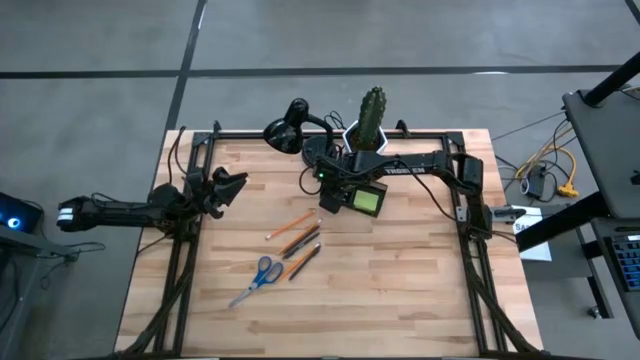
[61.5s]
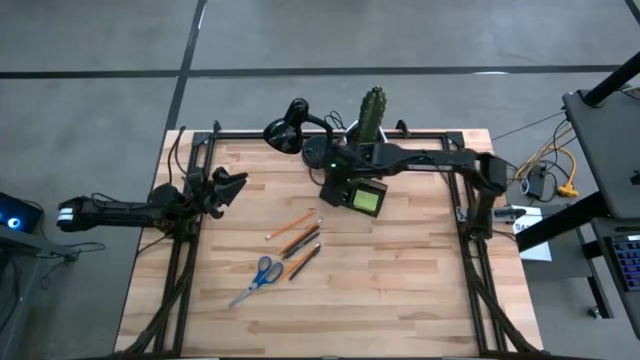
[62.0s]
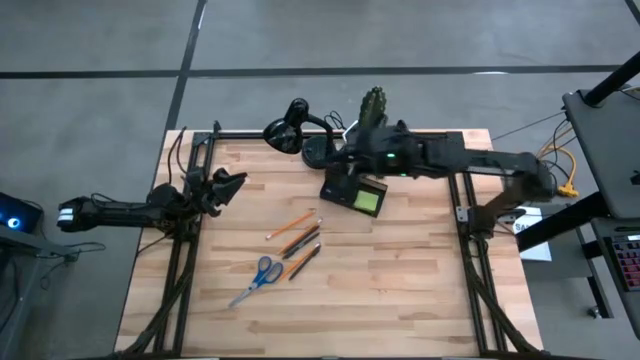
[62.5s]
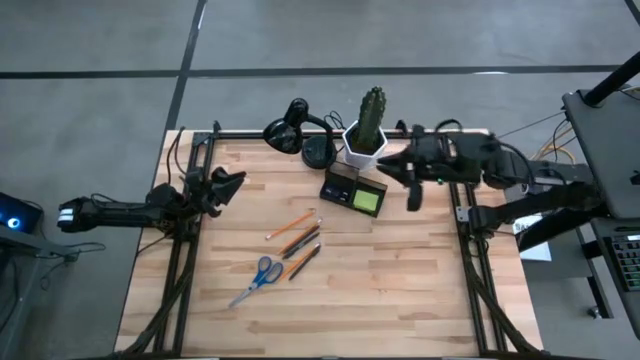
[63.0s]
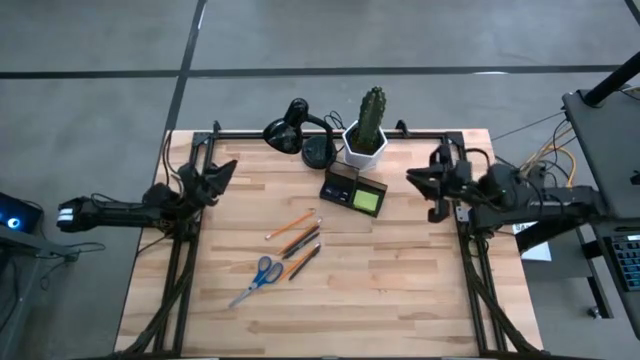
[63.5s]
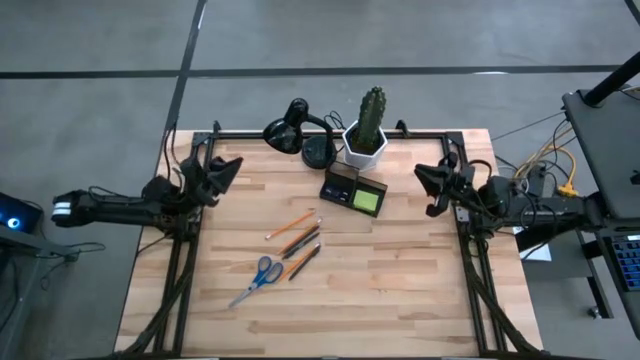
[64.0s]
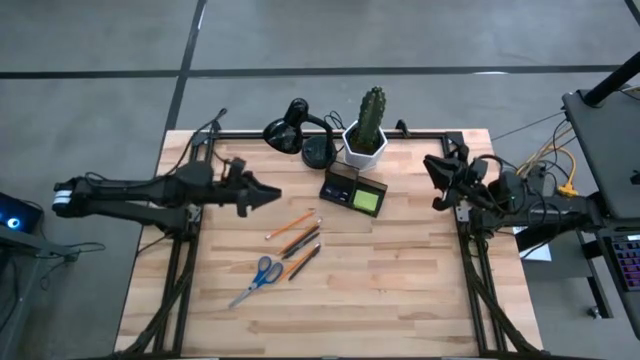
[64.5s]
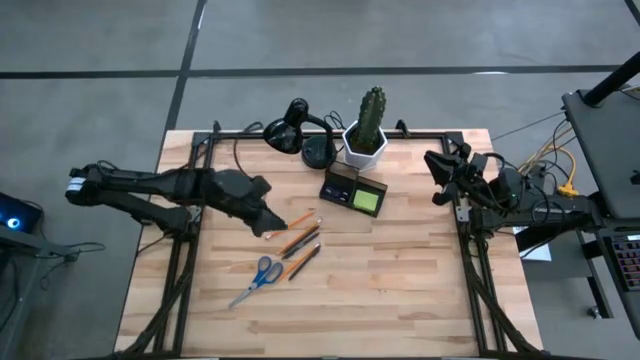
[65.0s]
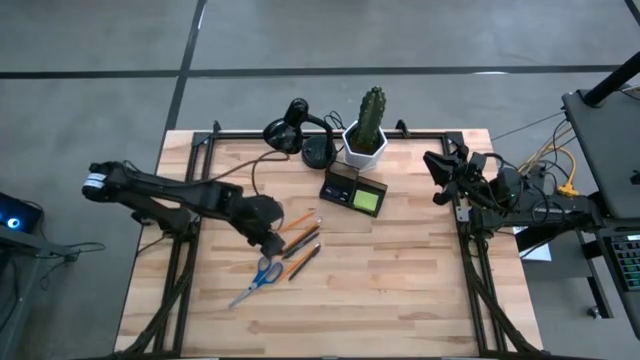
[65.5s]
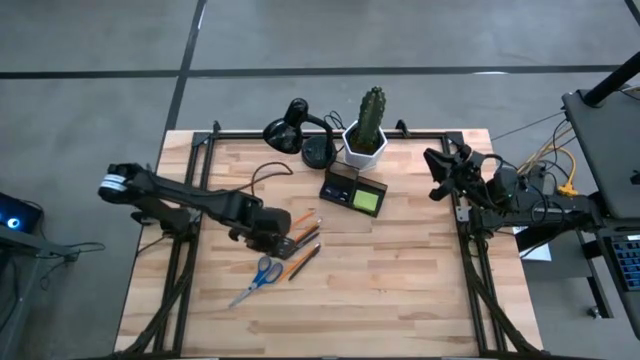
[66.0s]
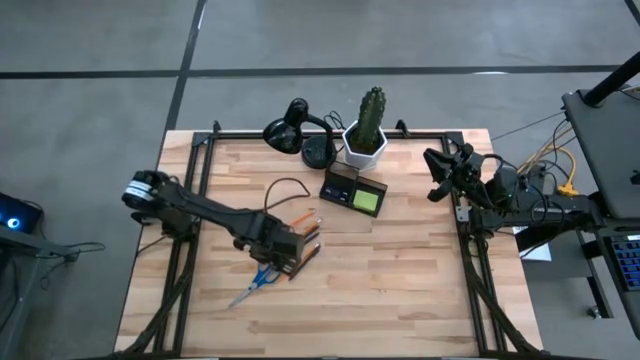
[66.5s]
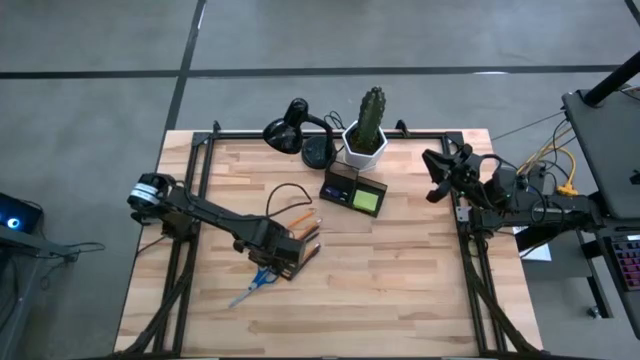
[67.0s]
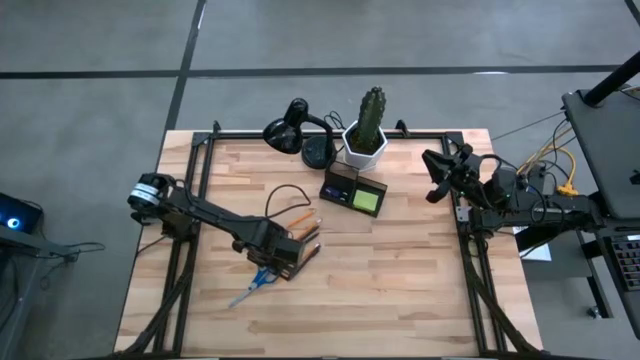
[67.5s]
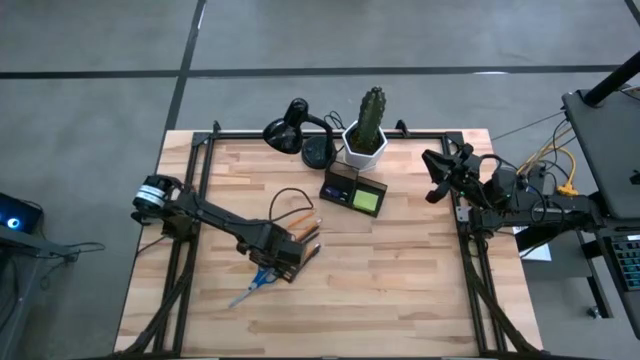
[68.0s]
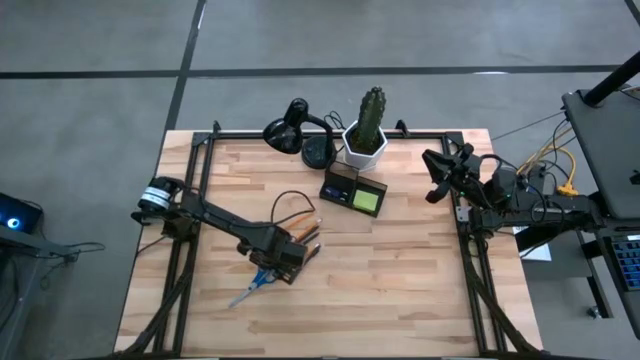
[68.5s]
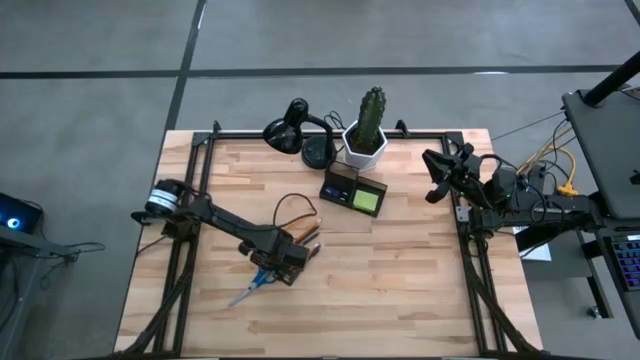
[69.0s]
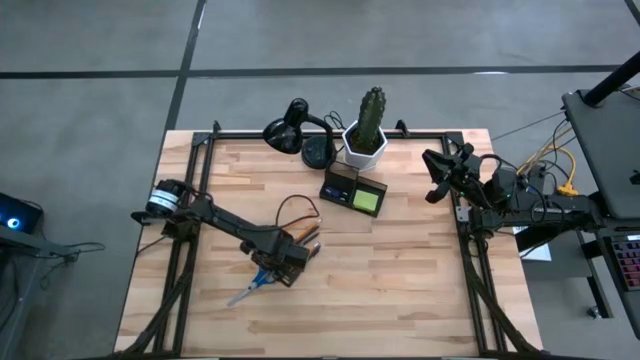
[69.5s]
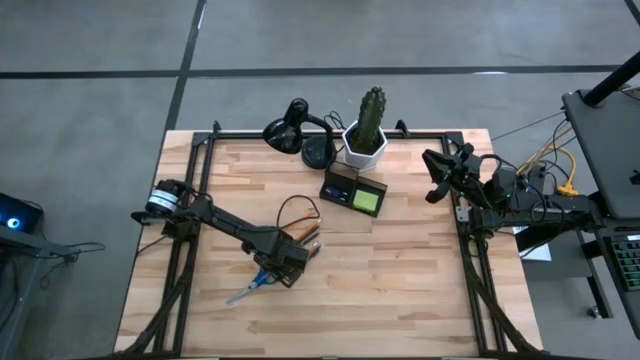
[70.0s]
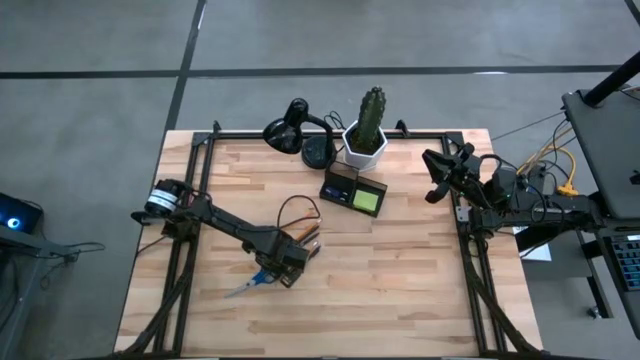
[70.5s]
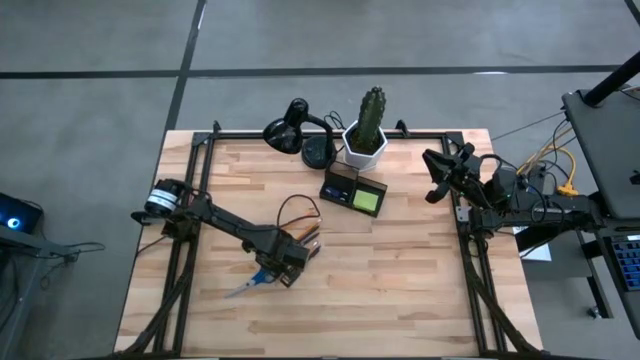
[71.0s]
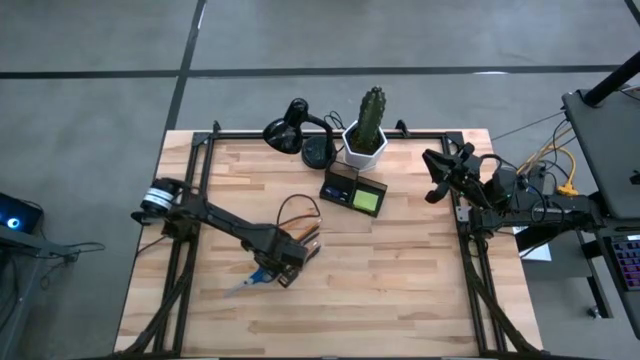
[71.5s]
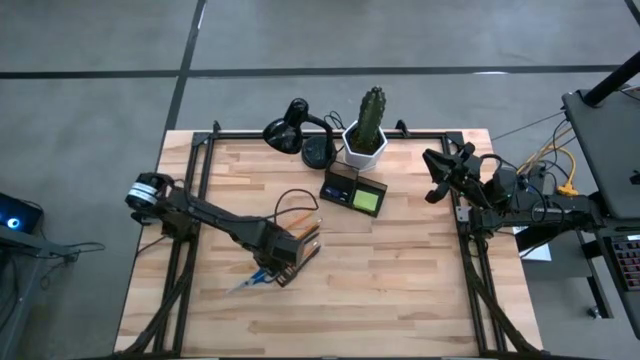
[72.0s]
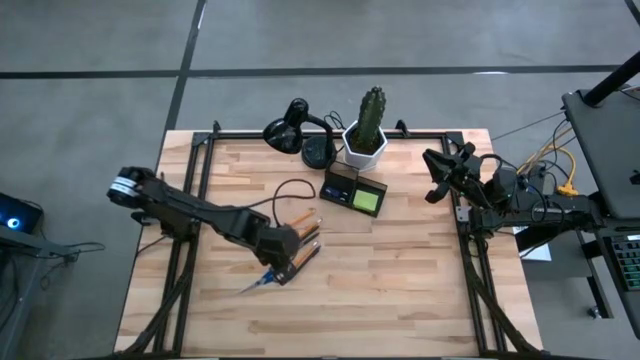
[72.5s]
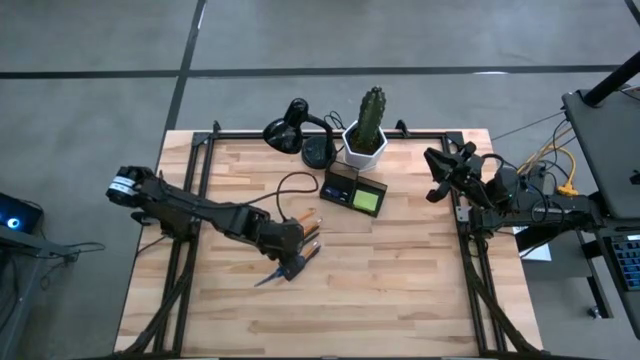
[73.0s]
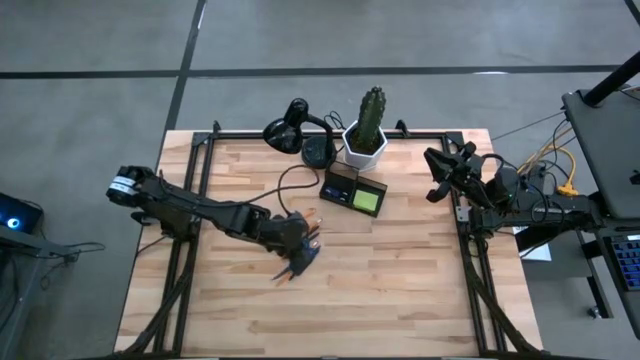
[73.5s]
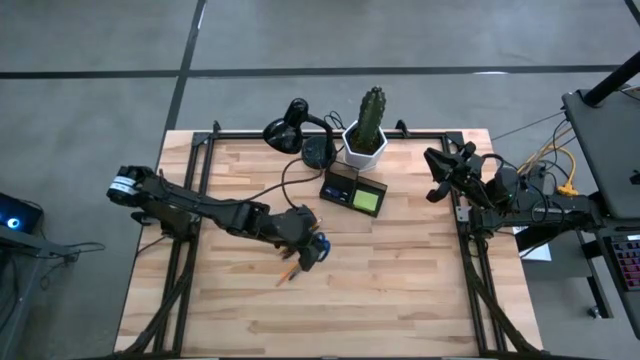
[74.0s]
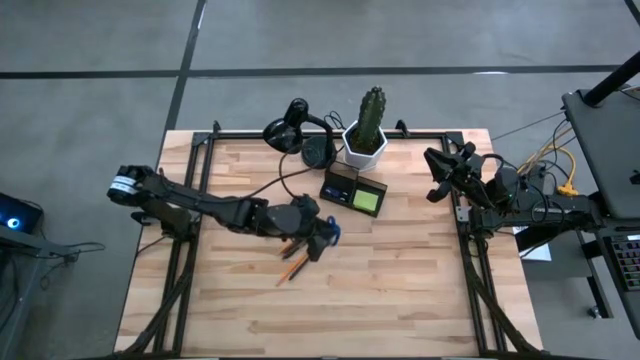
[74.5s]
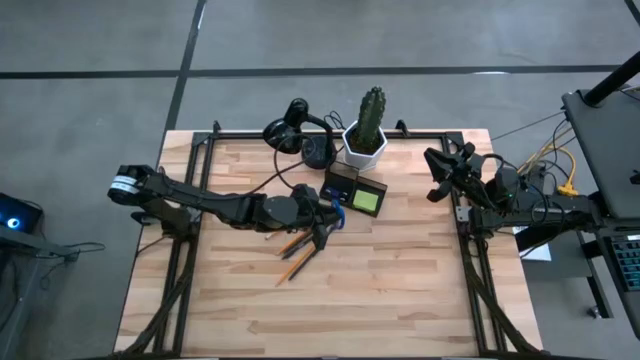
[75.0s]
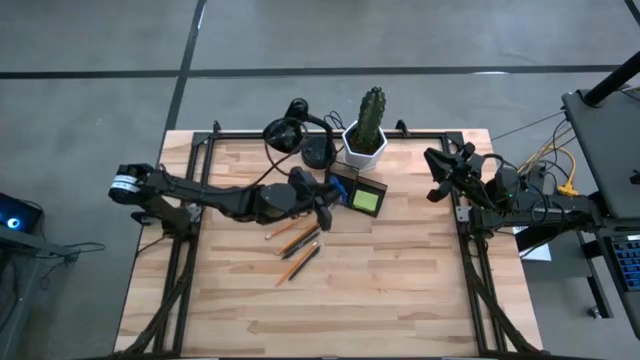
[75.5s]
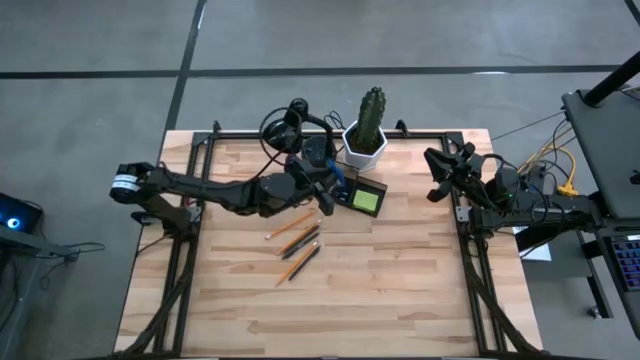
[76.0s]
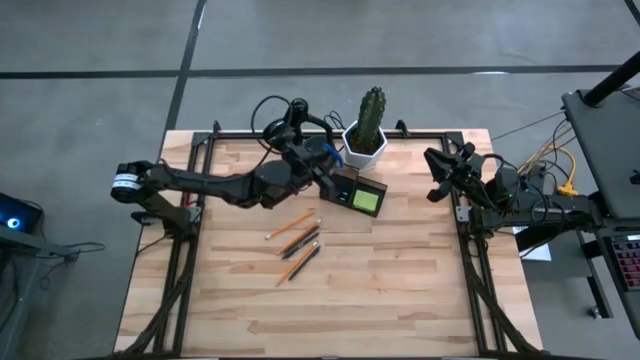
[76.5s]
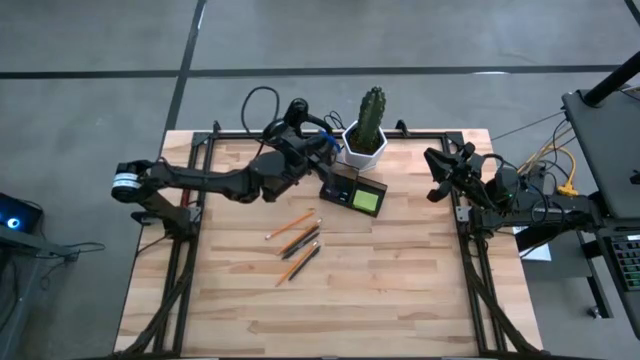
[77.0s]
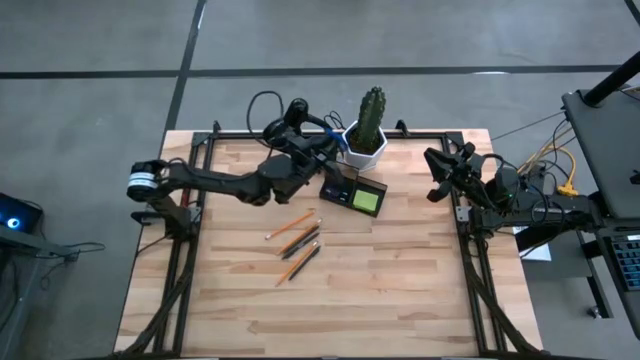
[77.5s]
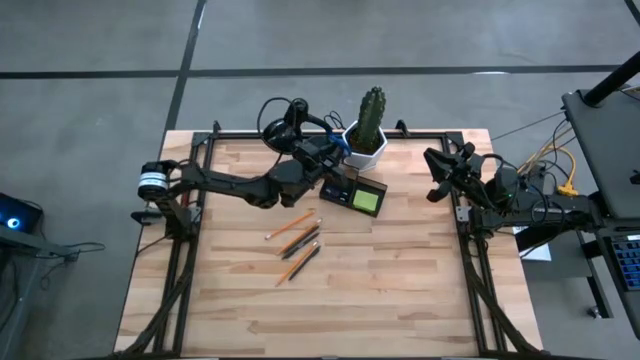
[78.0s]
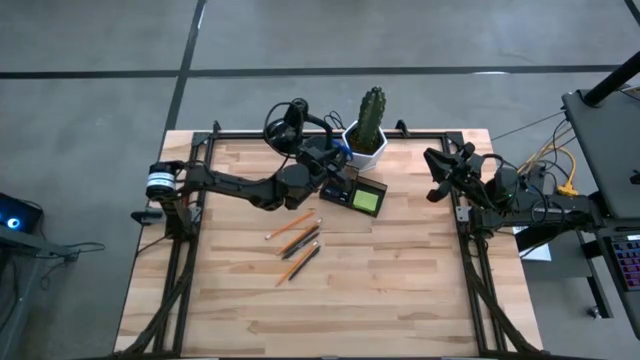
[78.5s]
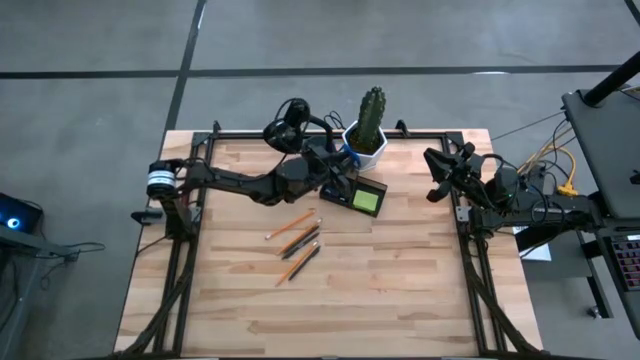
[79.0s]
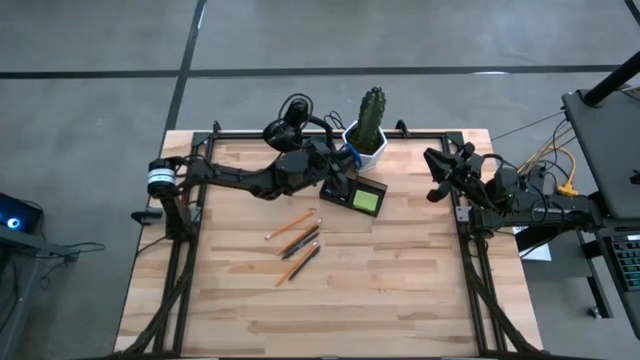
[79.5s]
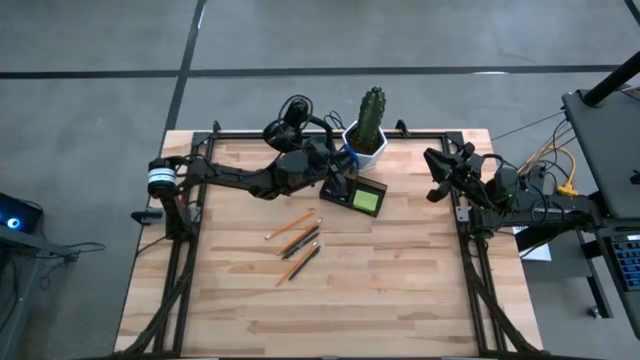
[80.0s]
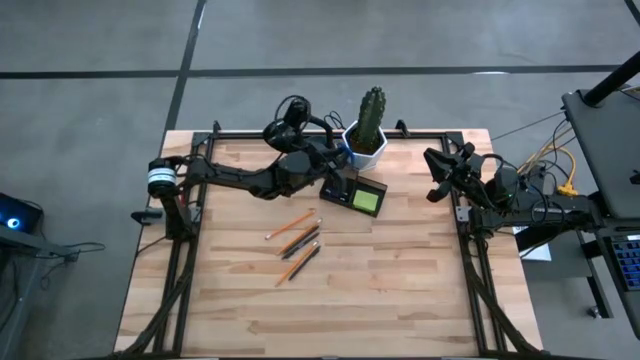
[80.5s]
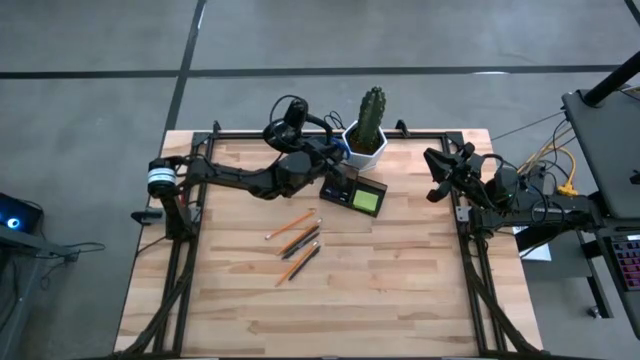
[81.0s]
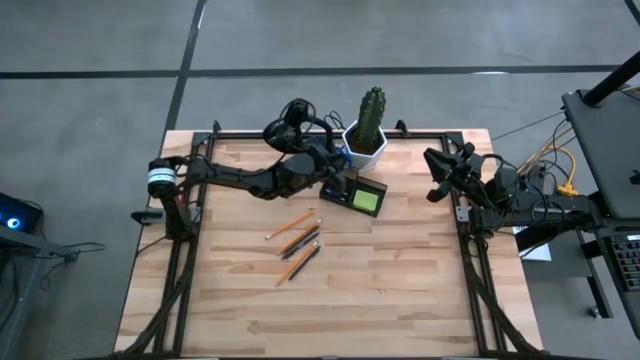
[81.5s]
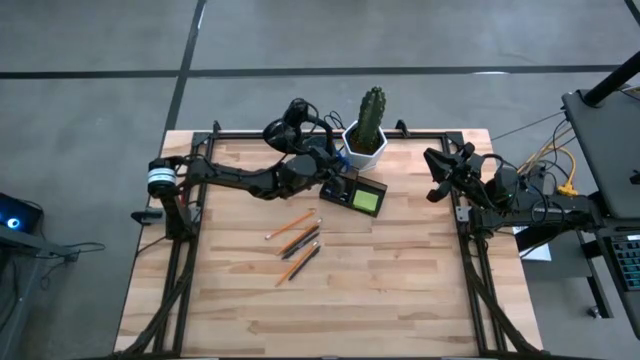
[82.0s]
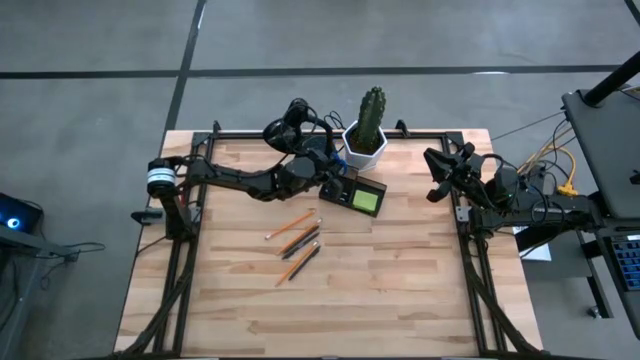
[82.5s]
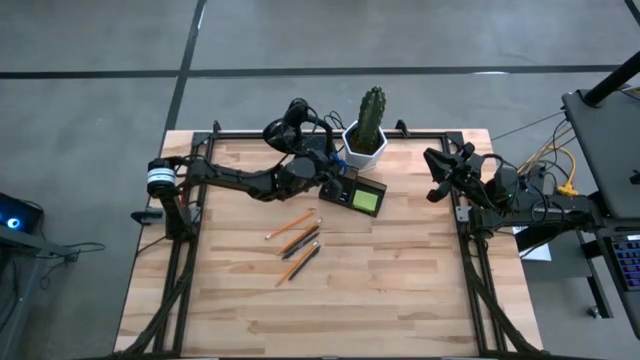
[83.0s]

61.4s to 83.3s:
Task: Pick and place office supplies into organizer
Put the blue scissors into the black desk organizer
